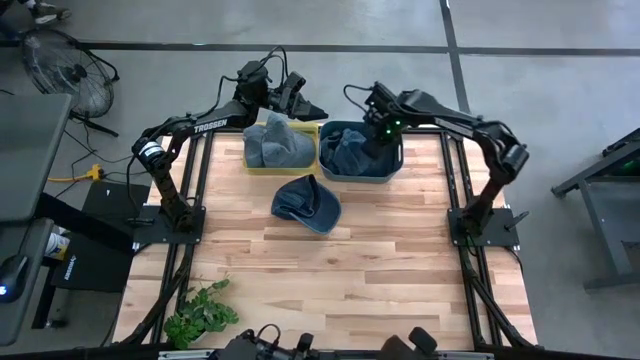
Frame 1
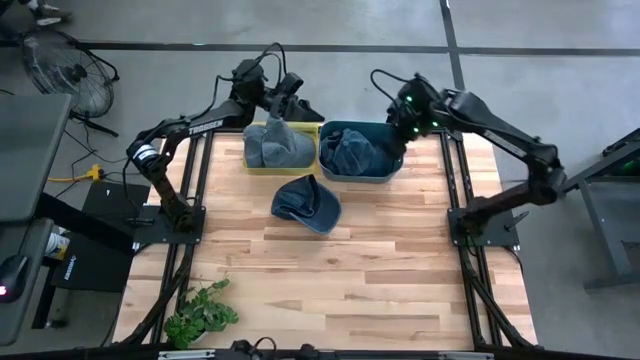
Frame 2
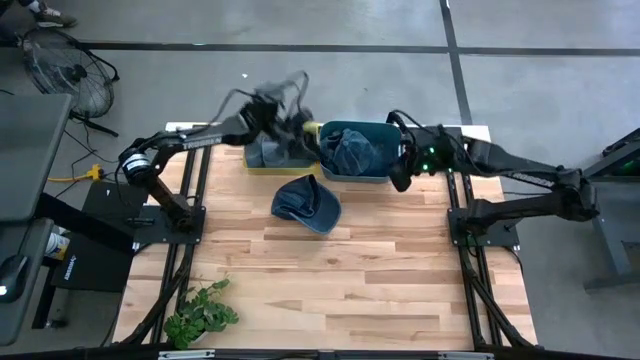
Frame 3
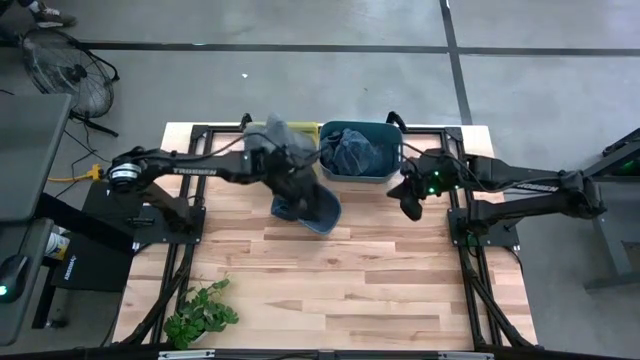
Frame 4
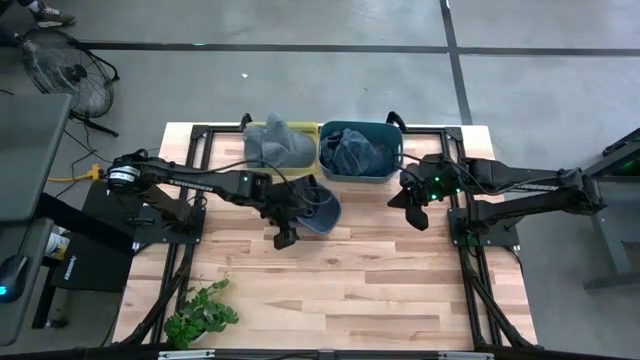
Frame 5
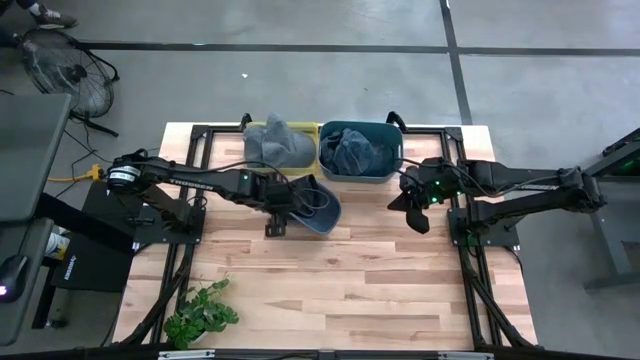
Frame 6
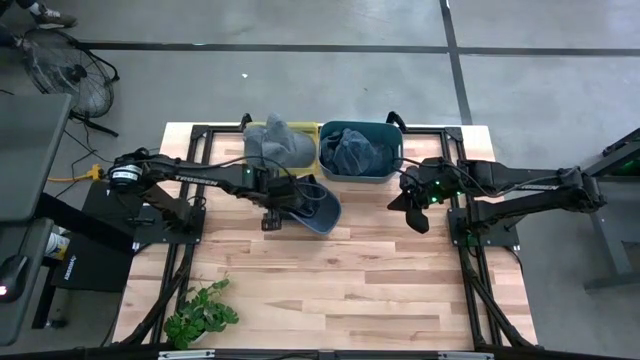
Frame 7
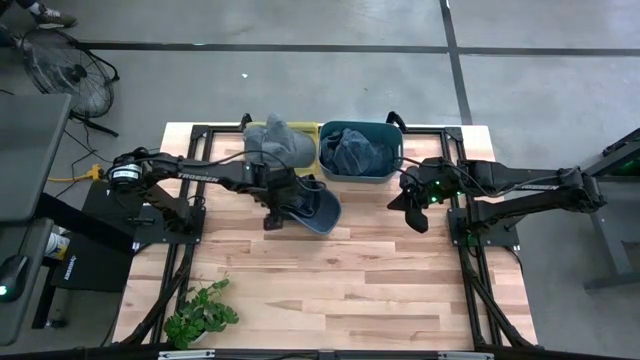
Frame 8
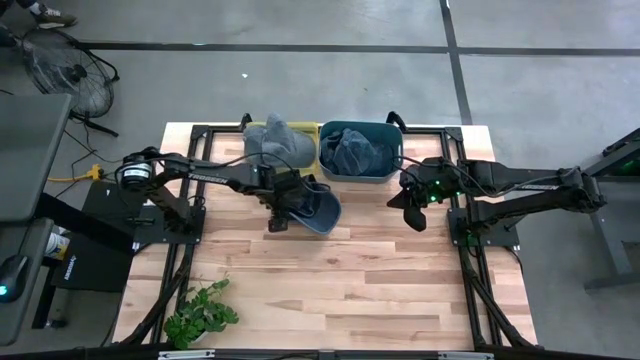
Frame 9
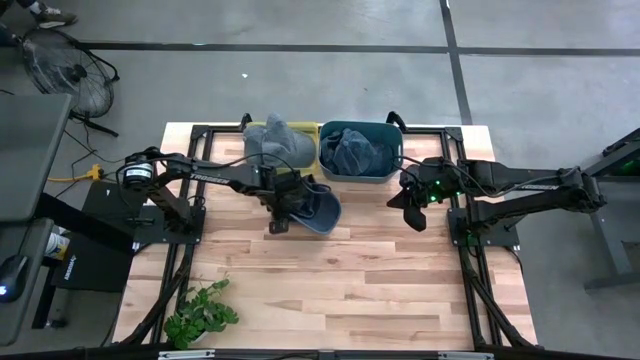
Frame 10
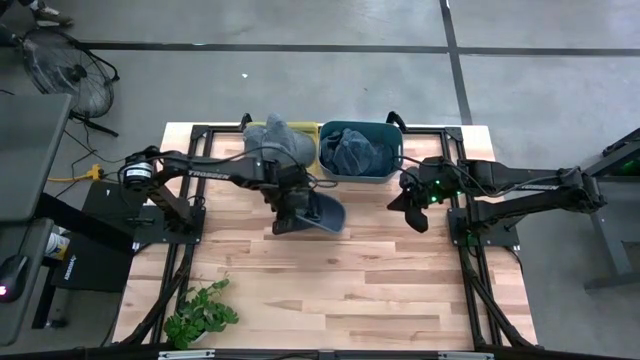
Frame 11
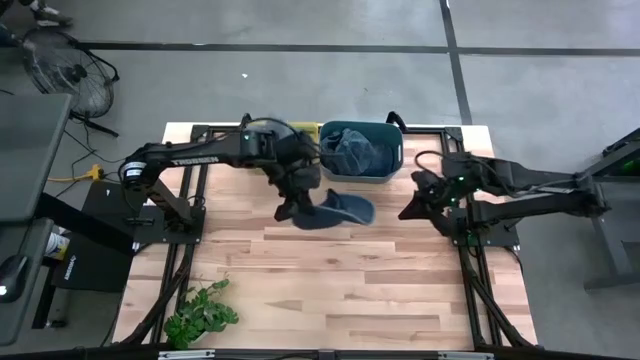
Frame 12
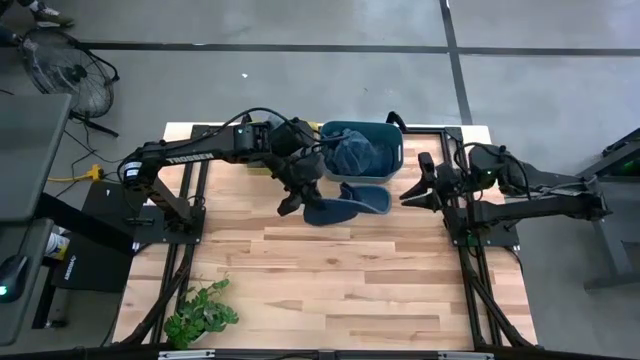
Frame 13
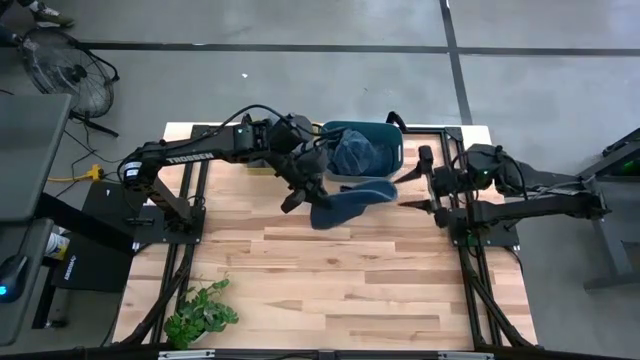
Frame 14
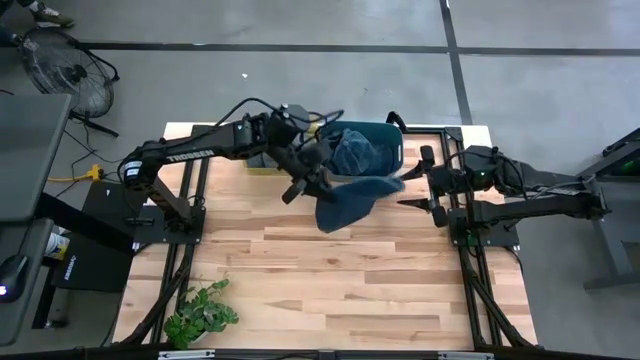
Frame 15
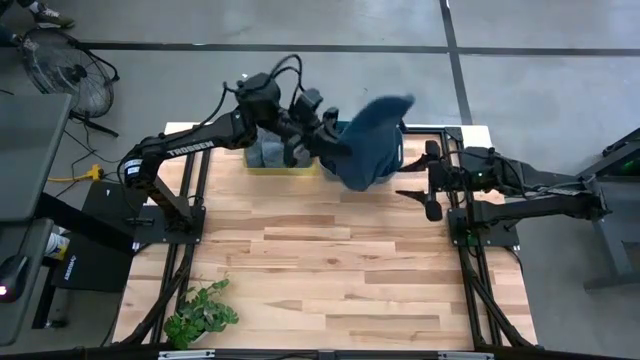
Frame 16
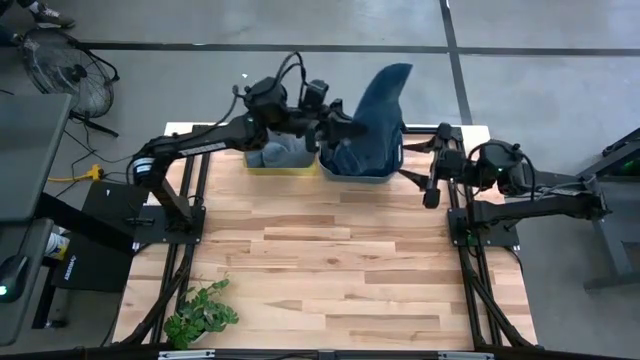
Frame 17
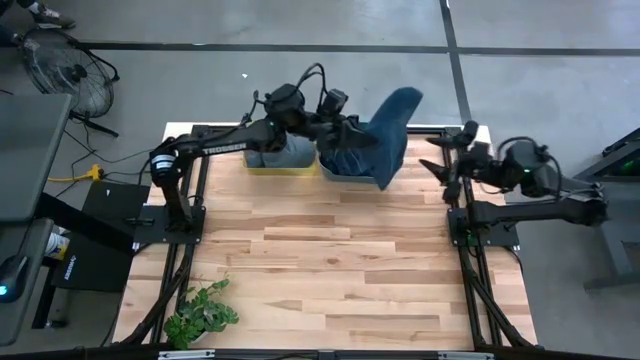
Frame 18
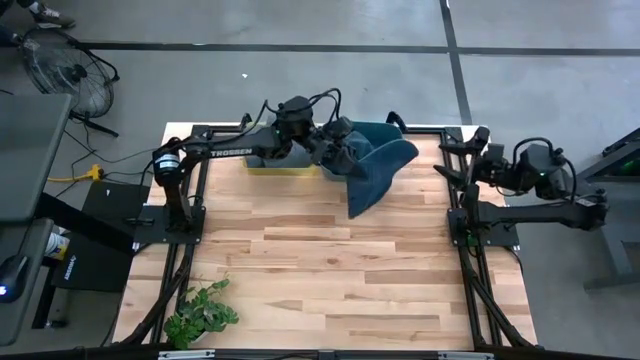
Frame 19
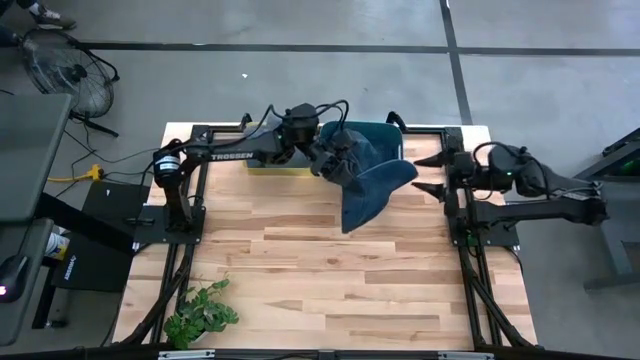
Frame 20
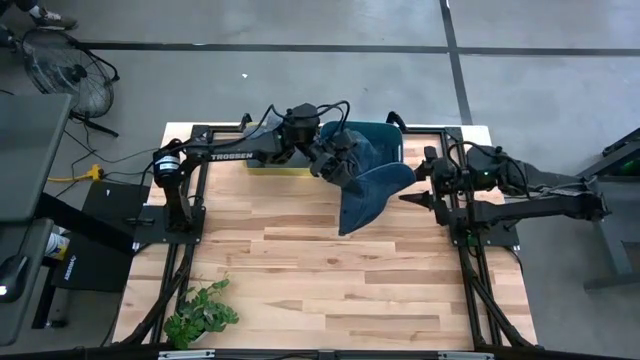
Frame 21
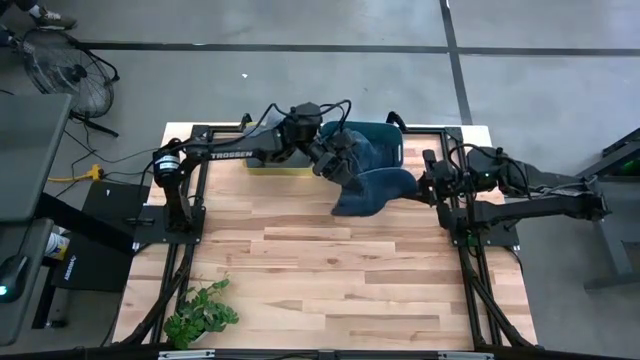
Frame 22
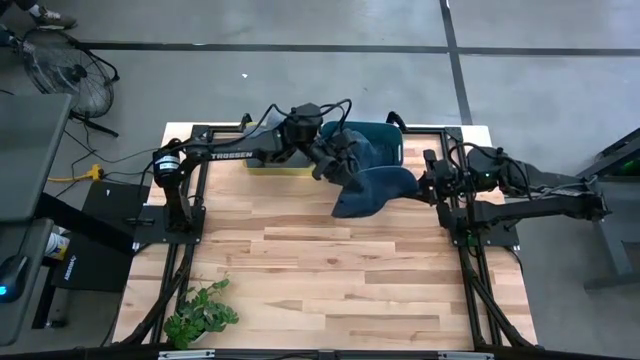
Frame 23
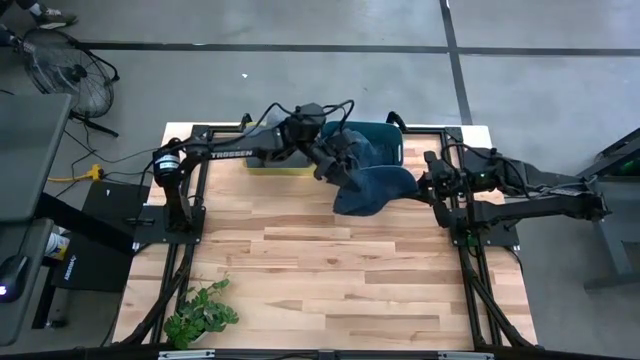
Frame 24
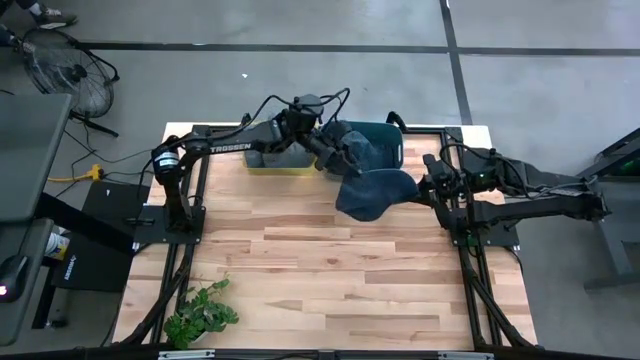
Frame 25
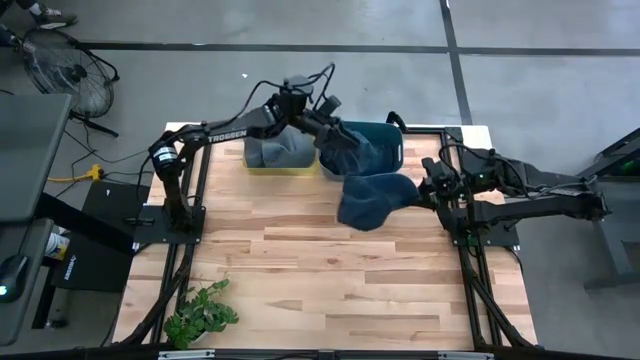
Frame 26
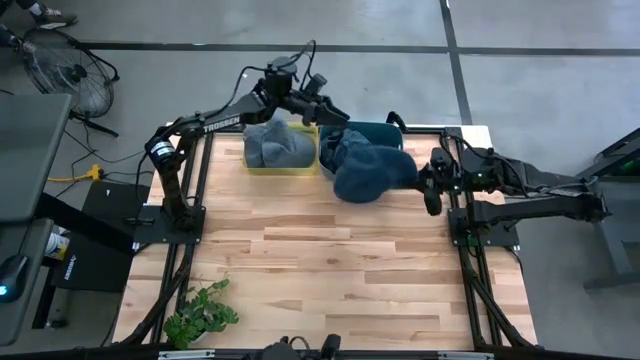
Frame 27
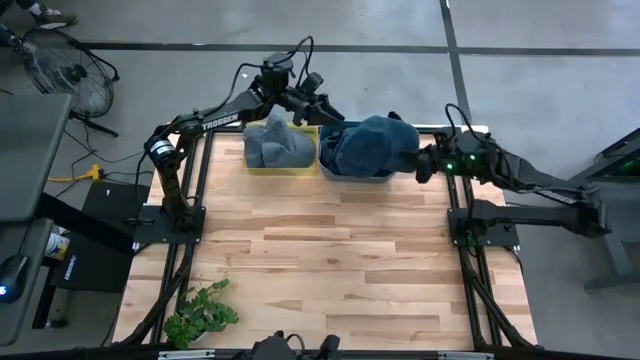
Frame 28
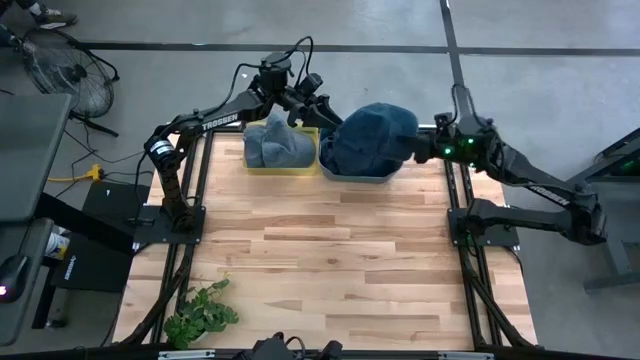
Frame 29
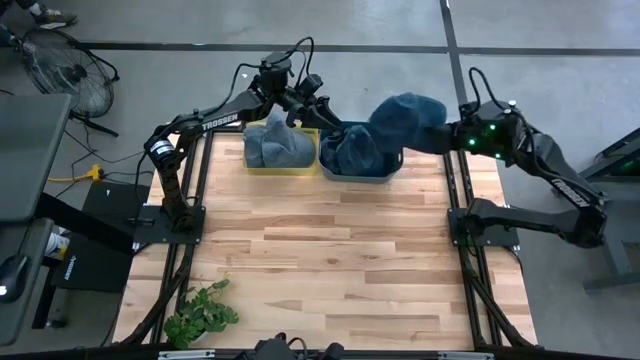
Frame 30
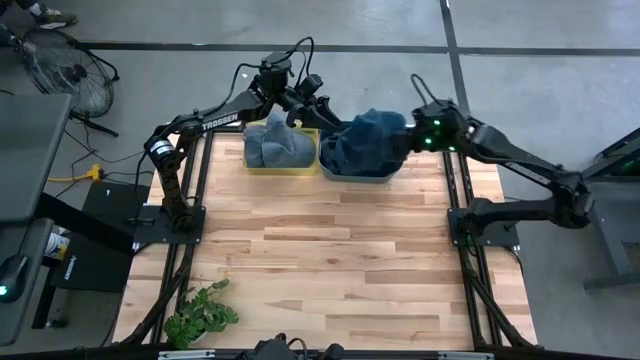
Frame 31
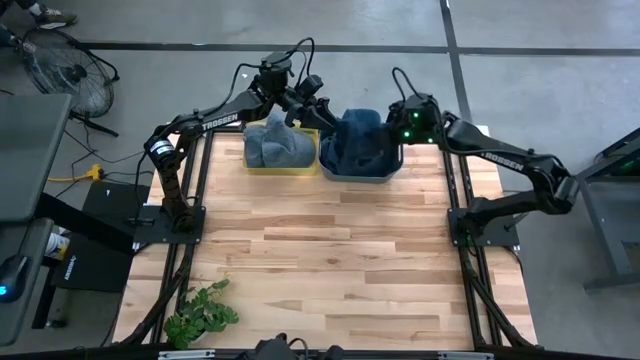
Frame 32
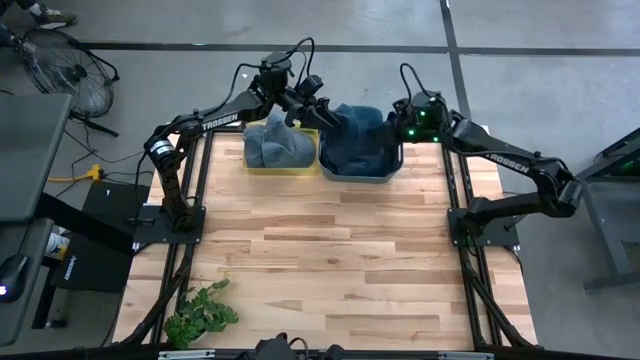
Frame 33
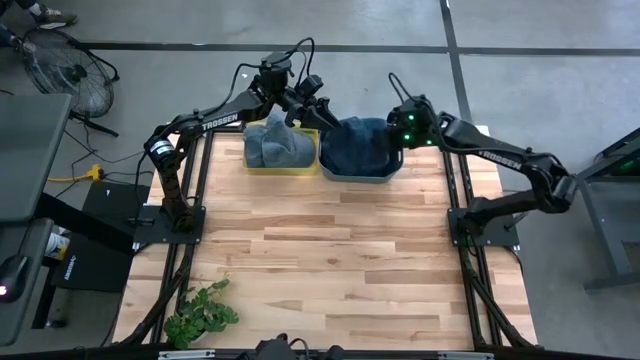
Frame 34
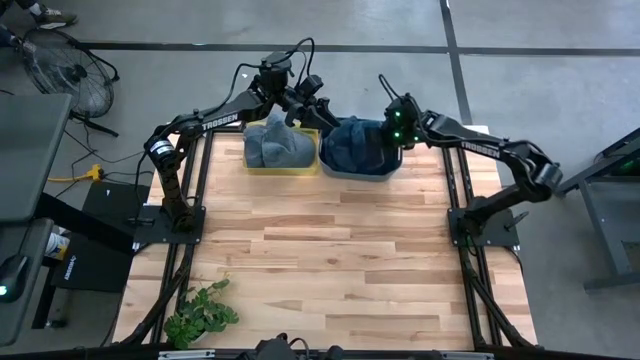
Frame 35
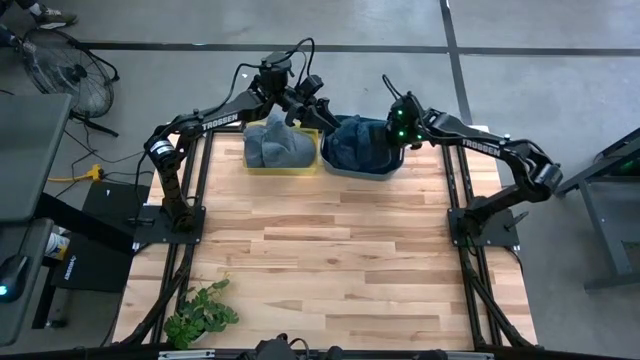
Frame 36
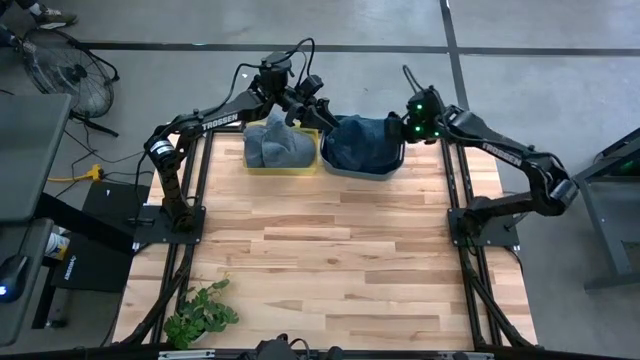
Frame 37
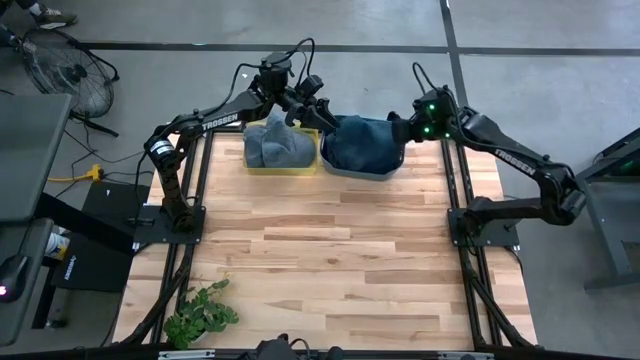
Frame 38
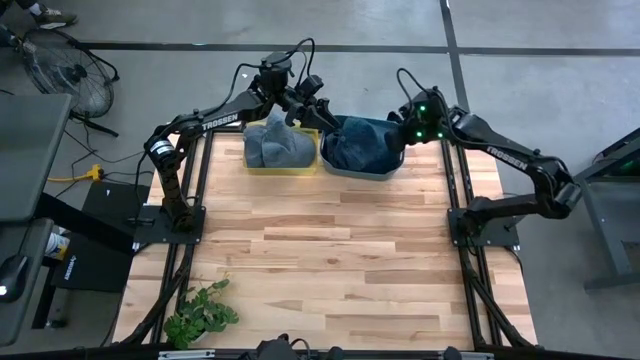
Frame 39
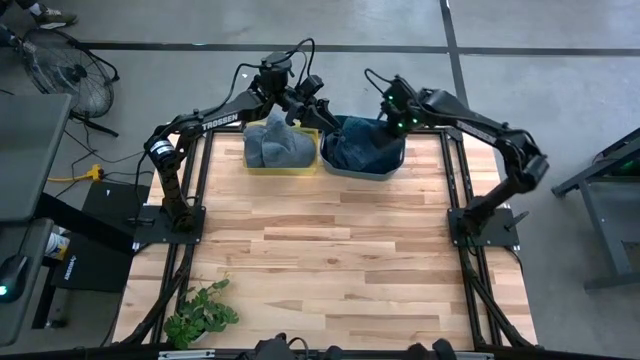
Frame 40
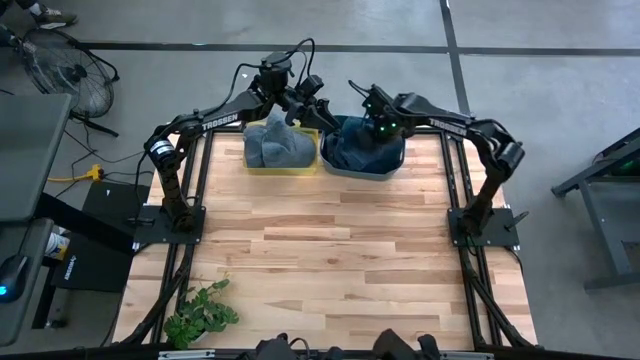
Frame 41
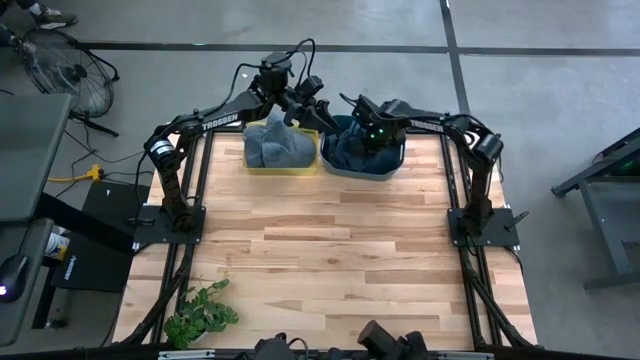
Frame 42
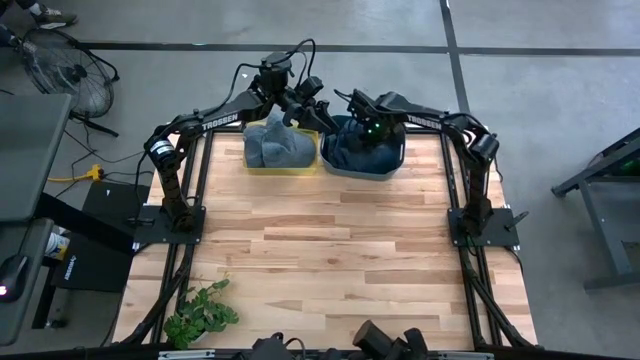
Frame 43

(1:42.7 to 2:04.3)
Task: Pick & Place hat
Put the blue cap into the blue bin
